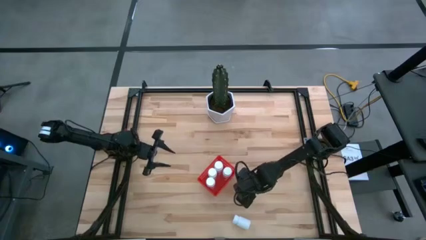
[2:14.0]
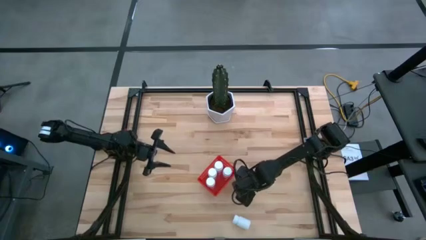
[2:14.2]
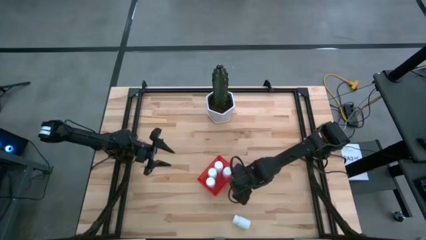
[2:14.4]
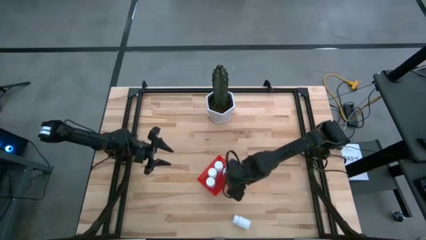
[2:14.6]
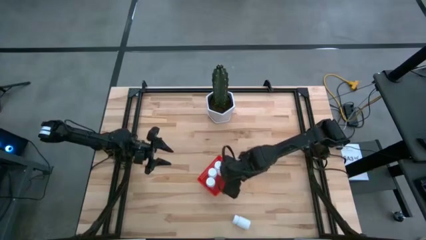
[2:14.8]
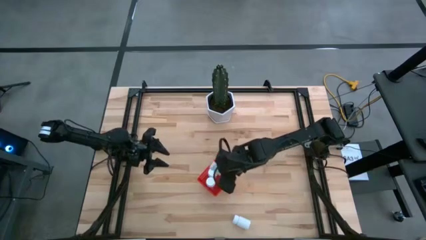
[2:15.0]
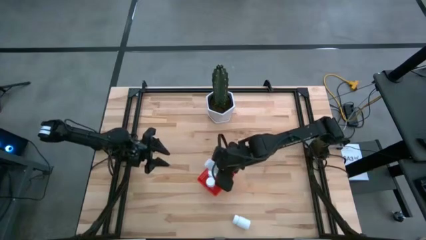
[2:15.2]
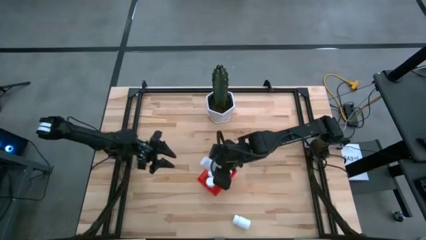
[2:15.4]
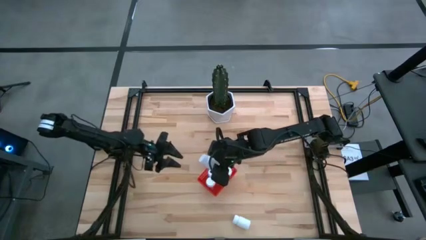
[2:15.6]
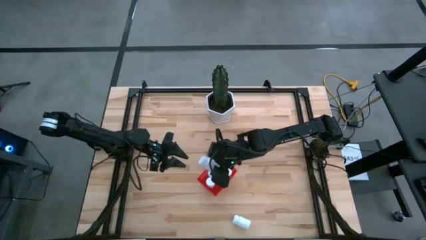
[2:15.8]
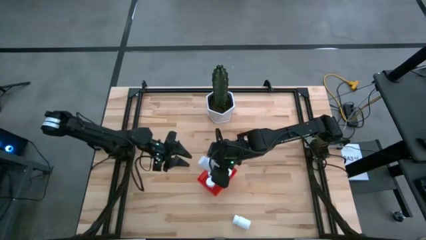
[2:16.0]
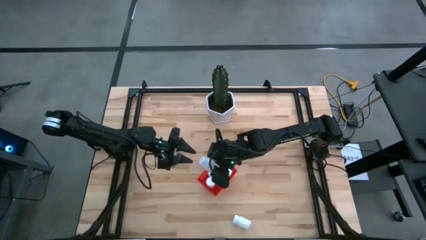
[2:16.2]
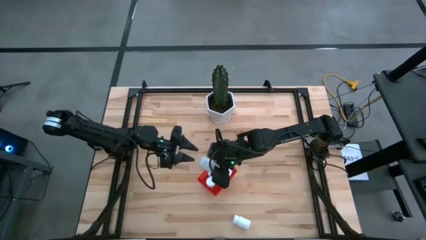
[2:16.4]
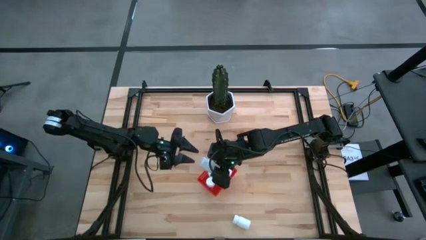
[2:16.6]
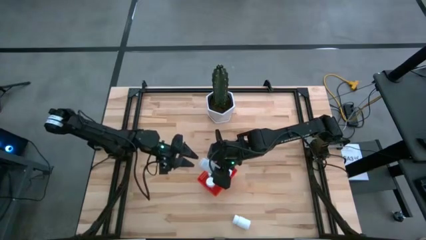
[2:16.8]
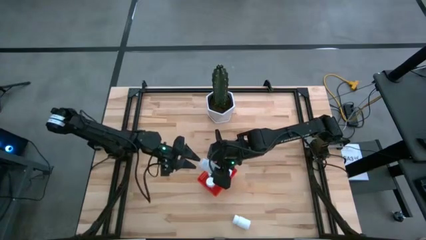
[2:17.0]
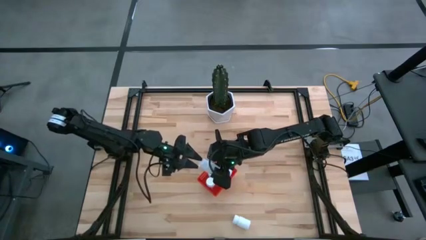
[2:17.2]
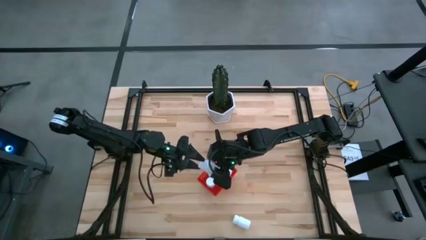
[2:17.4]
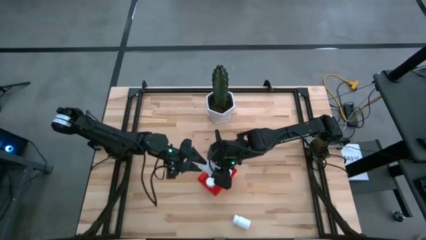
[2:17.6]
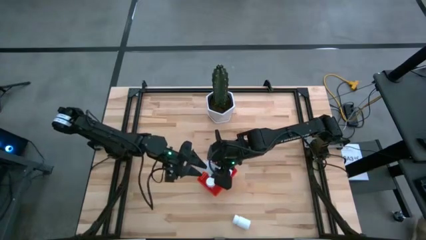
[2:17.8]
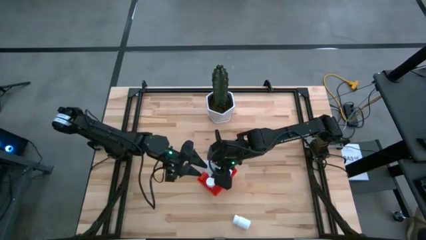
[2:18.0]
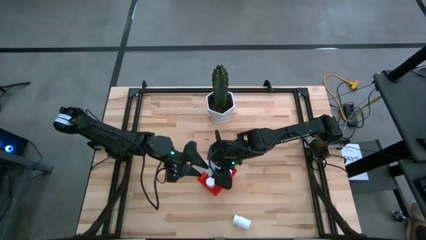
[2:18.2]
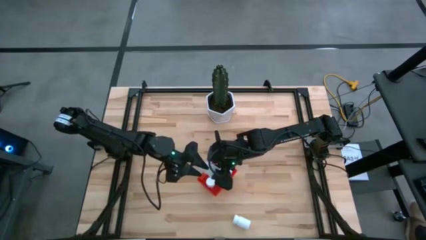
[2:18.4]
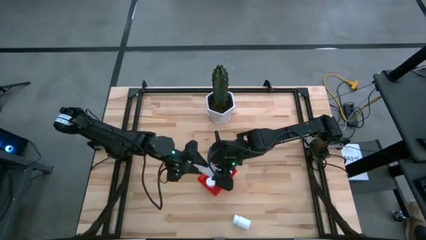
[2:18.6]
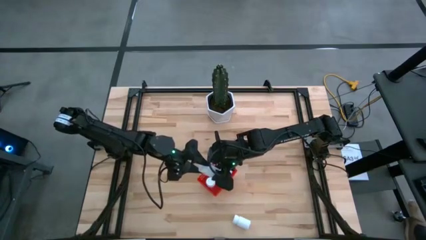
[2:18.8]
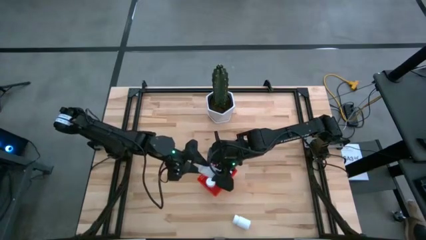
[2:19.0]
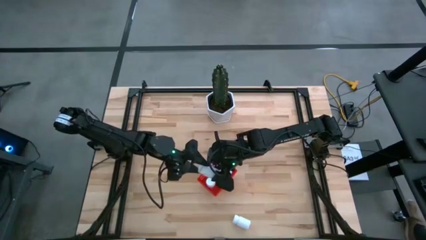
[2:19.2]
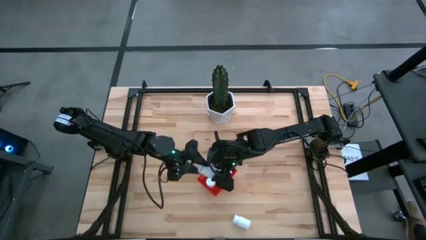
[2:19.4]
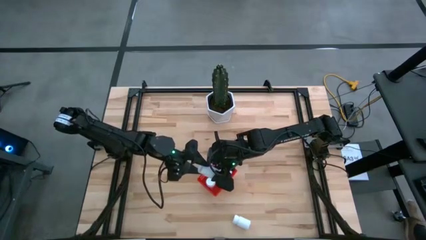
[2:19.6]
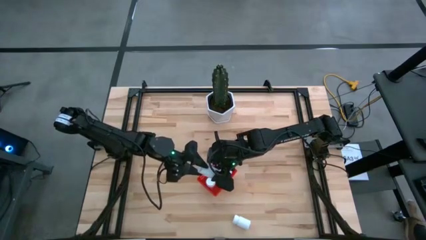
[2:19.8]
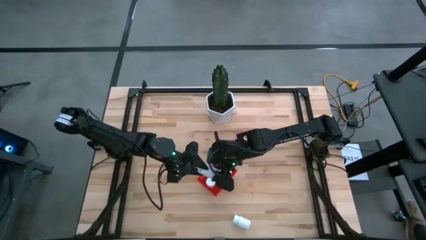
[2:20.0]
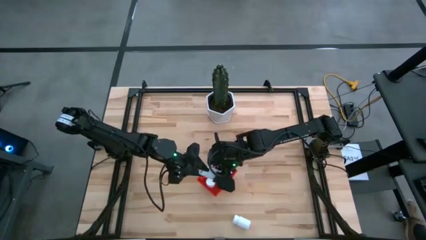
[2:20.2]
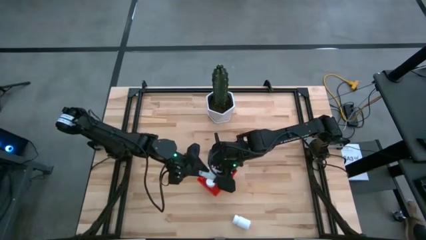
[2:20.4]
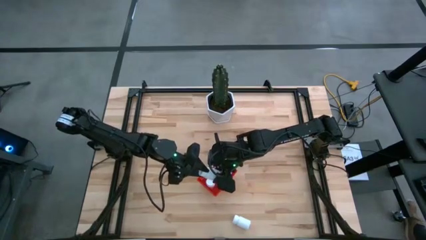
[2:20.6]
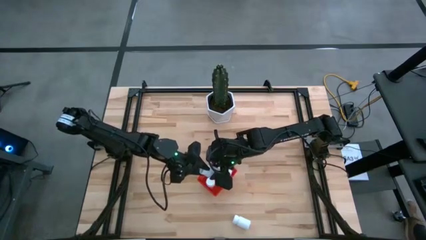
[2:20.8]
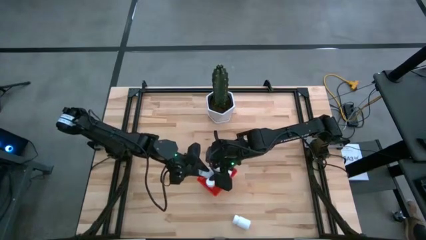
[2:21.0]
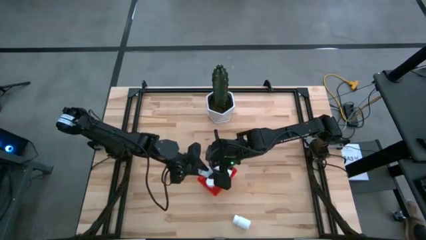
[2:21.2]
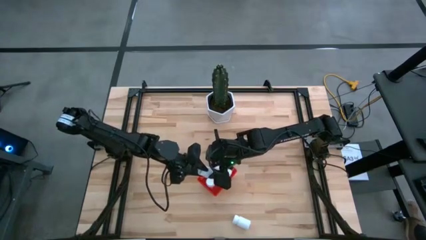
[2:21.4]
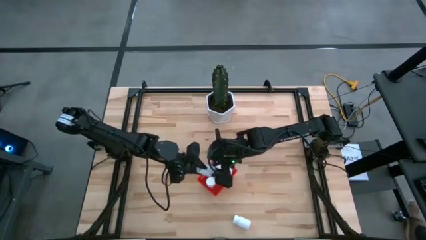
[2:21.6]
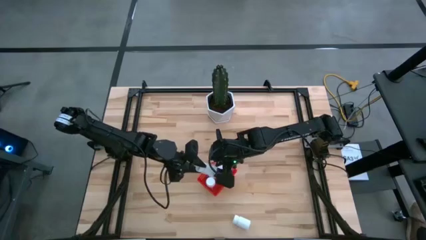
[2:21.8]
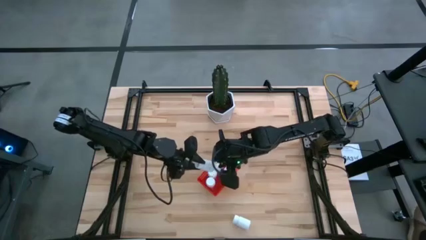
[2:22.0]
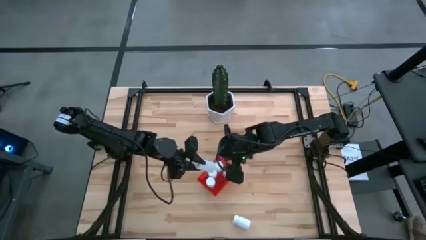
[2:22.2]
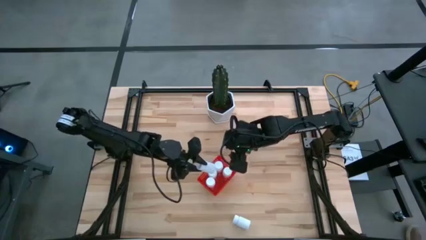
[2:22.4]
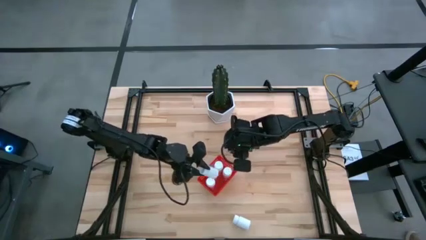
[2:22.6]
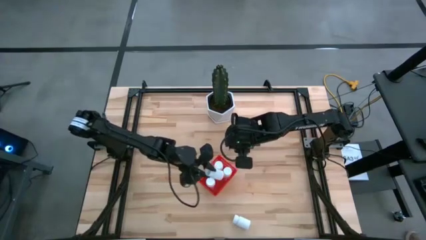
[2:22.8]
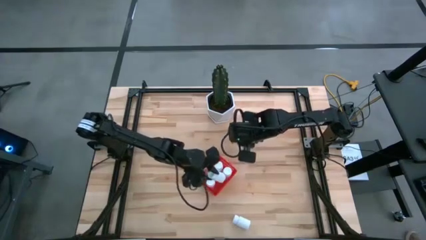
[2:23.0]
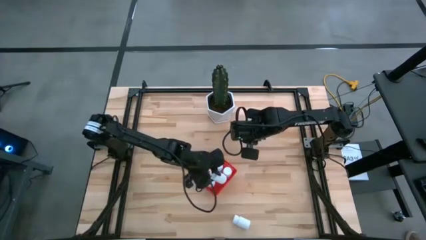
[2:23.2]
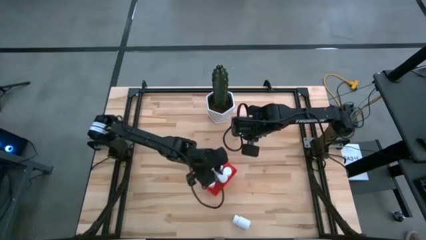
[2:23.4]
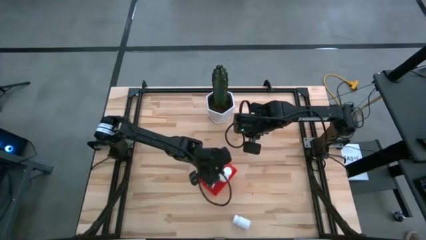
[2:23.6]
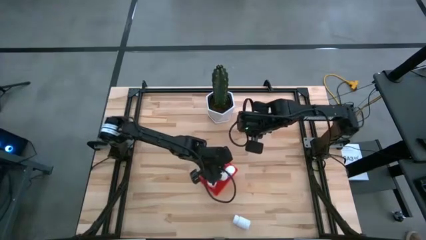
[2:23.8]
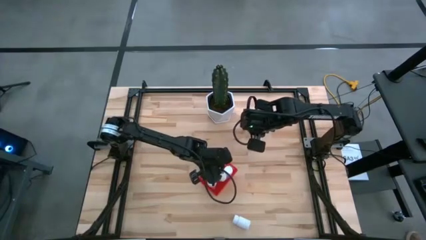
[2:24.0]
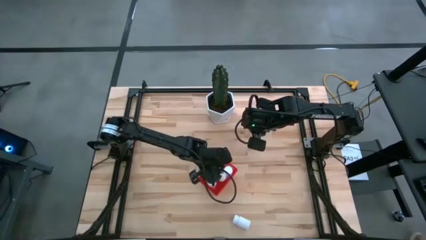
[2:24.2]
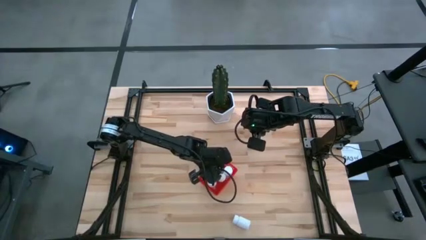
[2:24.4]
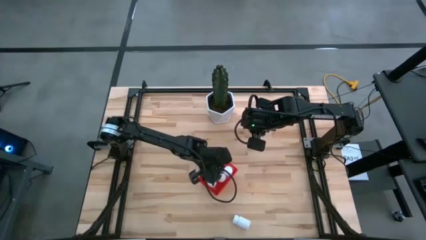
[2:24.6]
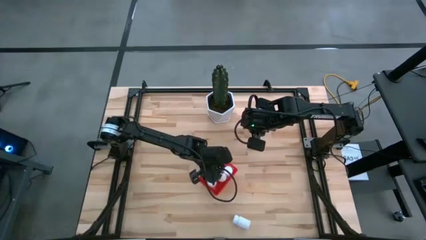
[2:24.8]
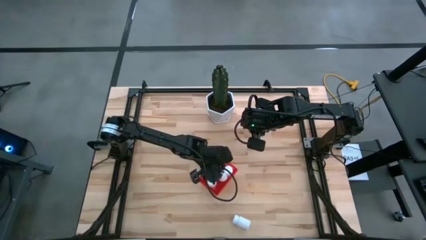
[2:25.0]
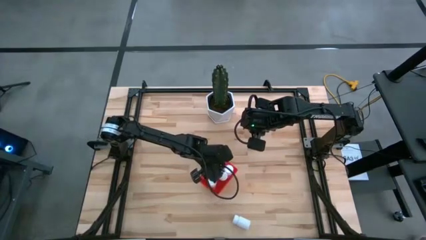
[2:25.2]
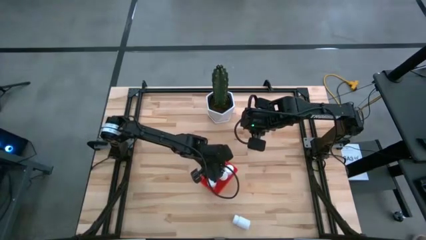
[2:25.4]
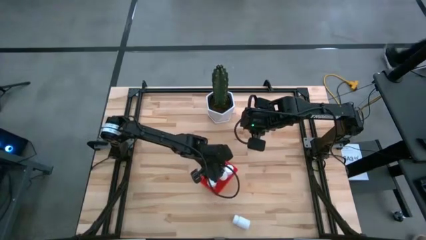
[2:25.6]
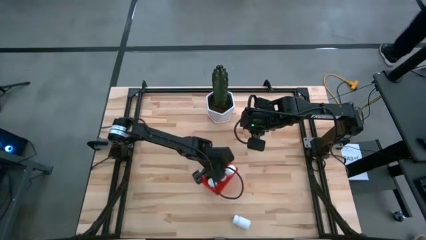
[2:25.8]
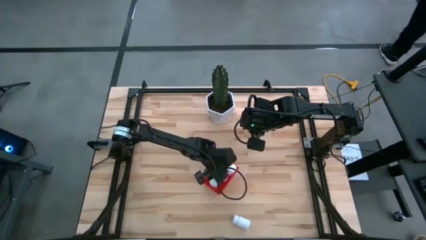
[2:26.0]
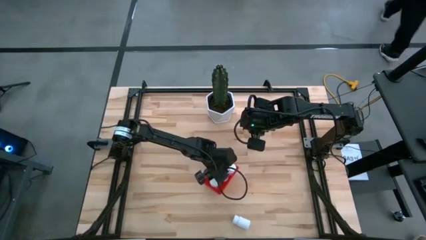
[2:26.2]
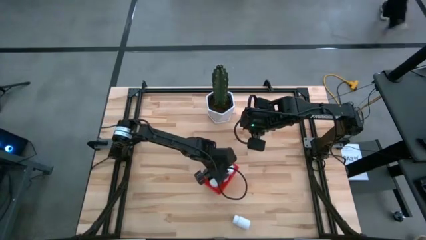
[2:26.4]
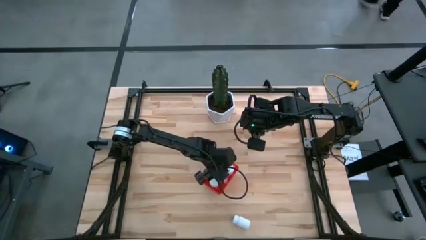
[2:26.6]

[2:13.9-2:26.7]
Task: Pick and place pill bottles into a basket
Put the white pill bottle into the red bin

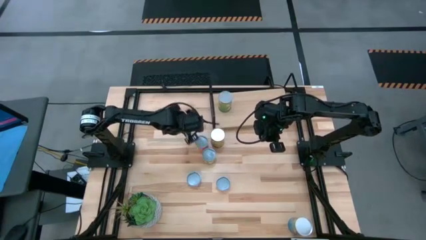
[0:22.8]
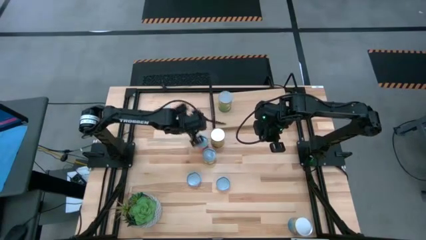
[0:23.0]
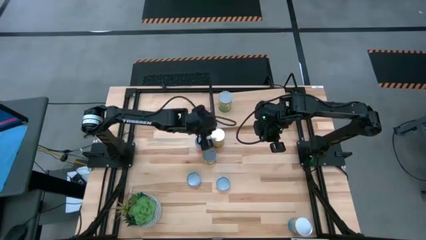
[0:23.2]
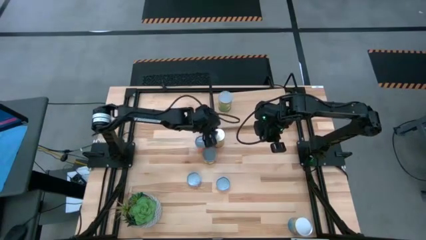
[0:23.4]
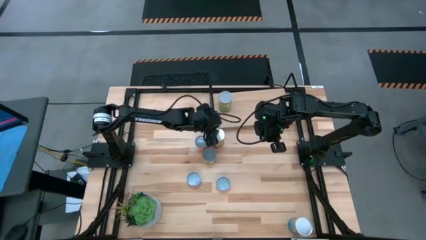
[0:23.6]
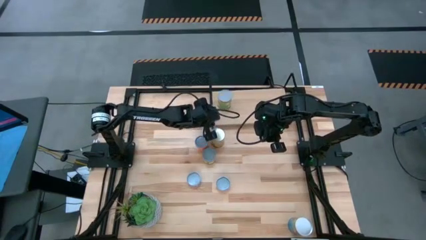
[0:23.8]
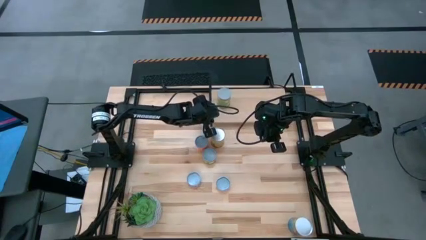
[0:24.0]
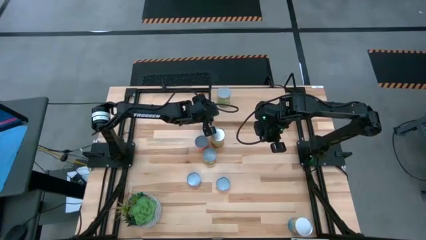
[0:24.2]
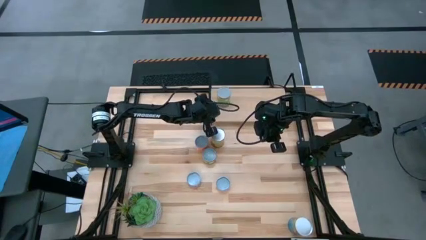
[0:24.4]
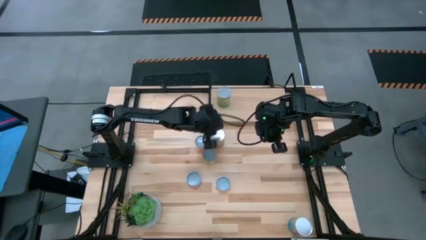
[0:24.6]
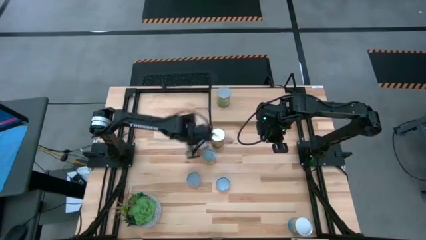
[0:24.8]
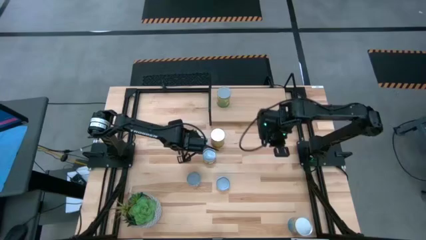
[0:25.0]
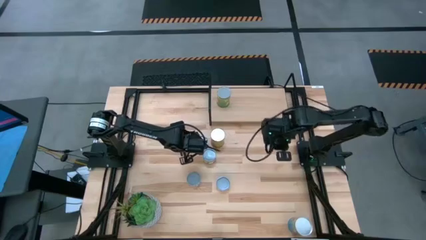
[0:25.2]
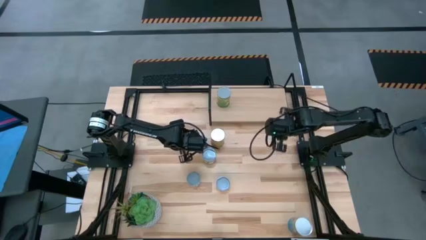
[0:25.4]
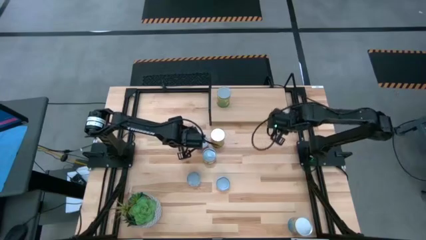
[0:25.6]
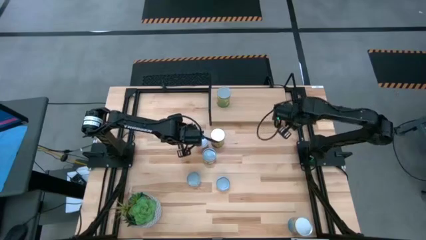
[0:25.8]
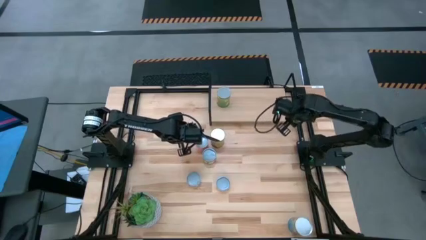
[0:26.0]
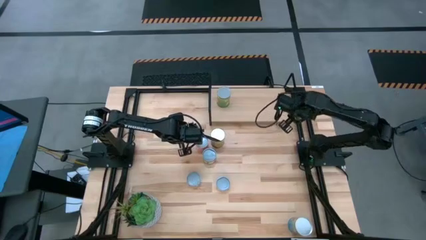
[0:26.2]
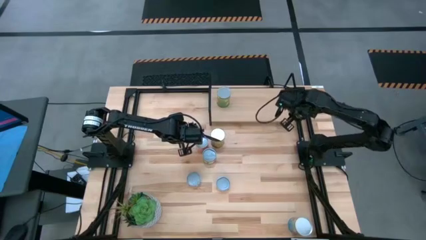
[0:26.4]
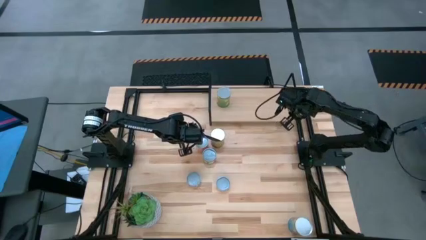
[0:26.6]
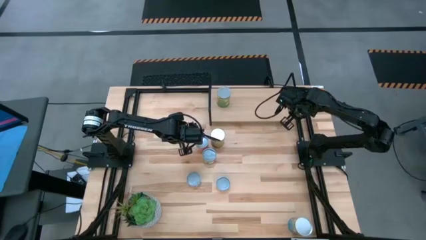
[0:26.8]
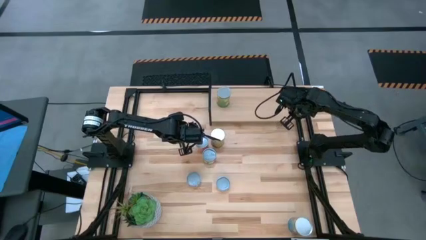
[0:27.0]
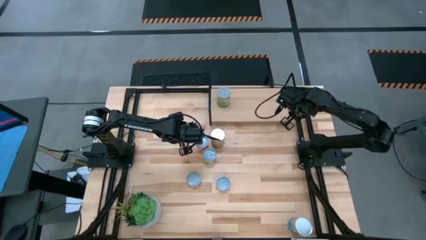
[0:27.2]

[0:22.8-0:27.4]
Task: Pick and place cans onto a shelf
Adjust the shelf
